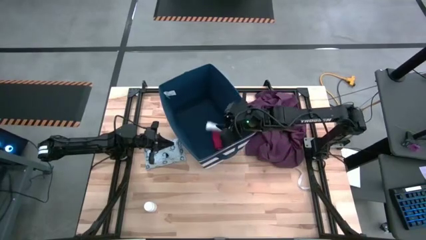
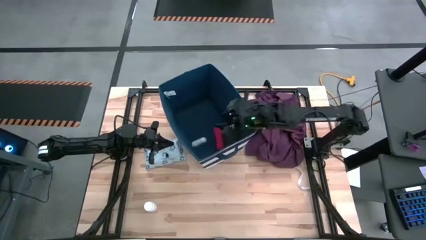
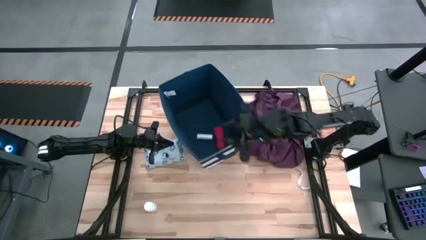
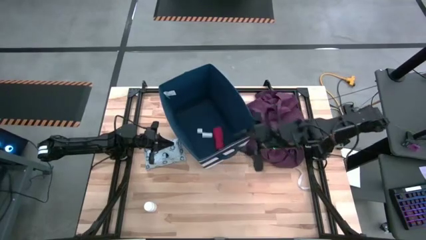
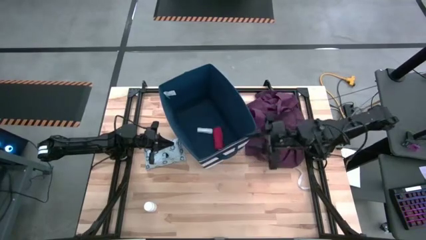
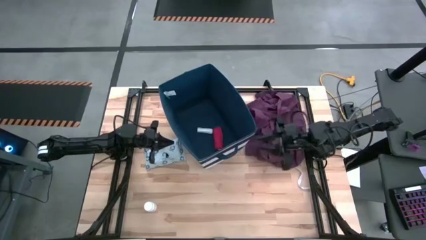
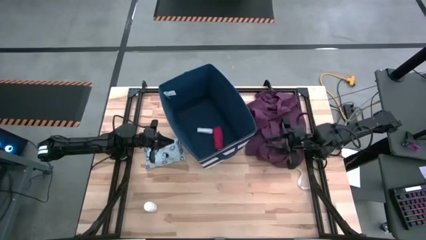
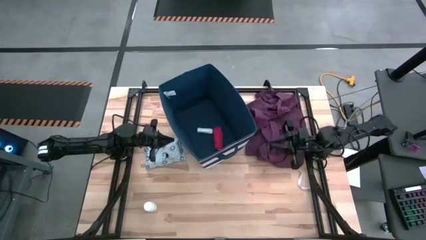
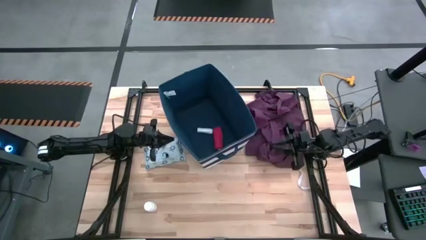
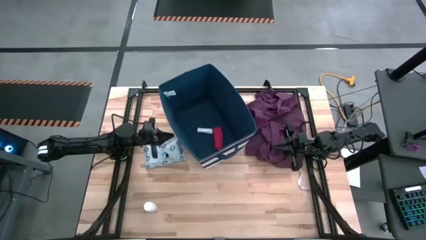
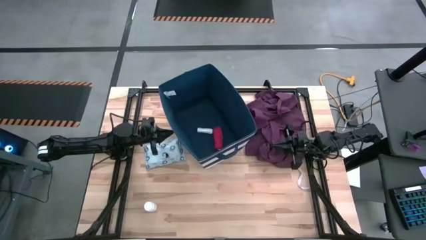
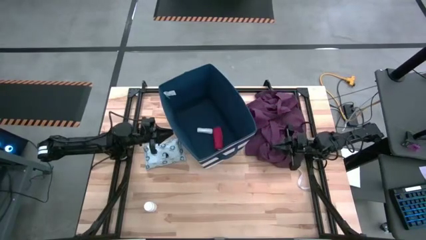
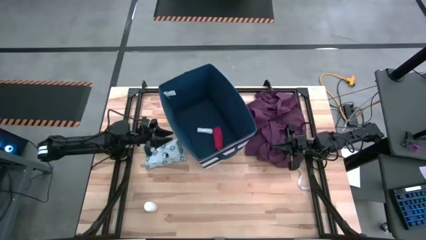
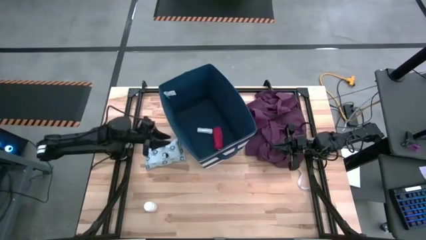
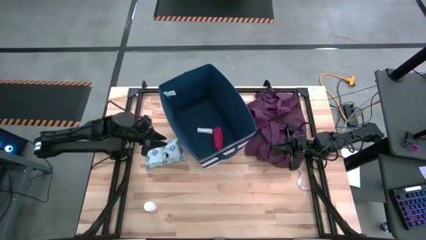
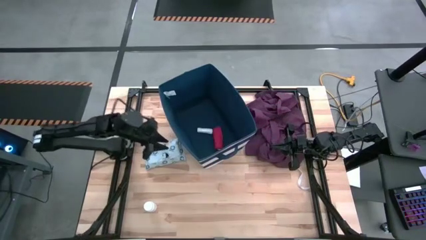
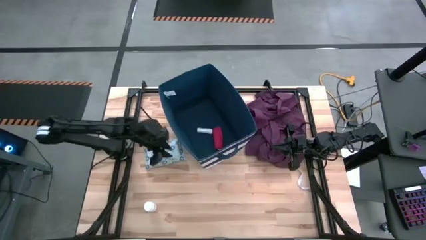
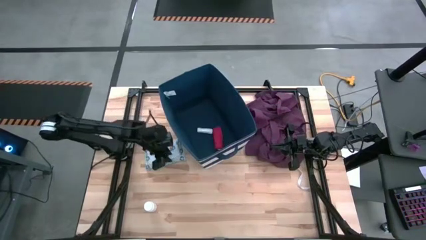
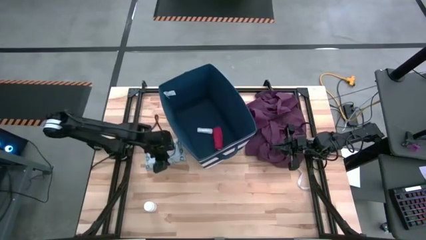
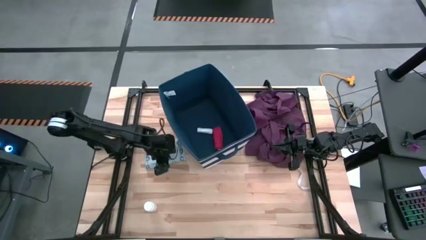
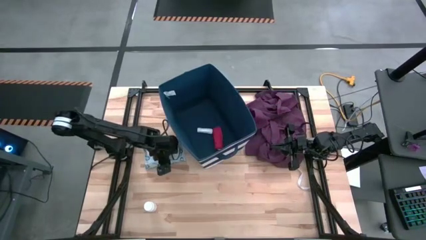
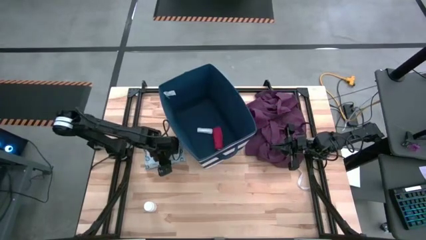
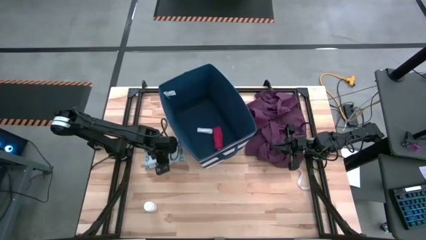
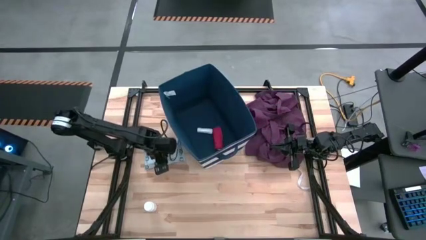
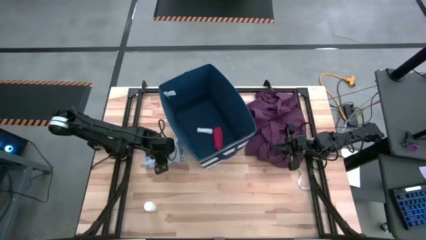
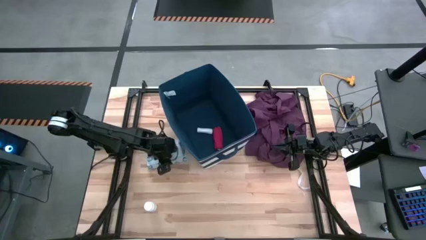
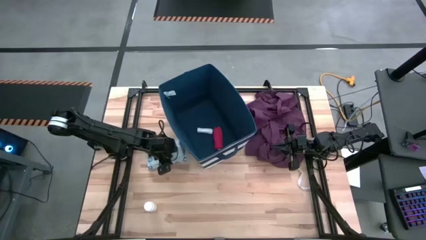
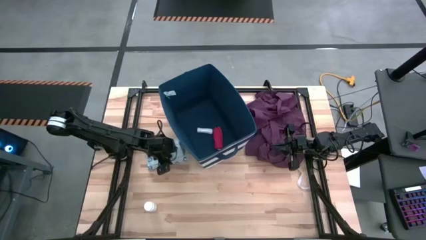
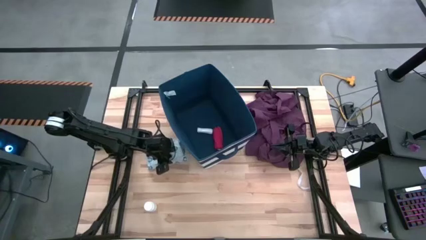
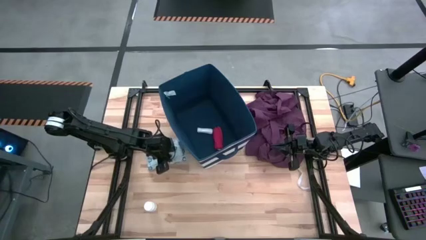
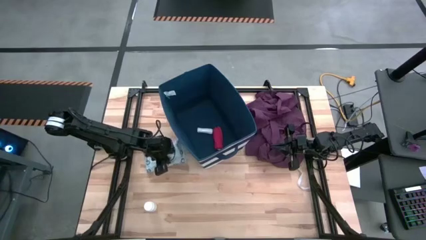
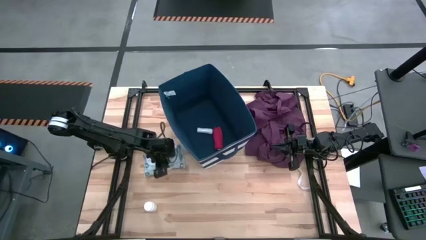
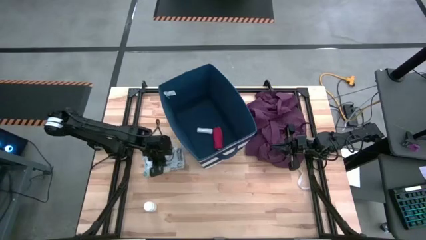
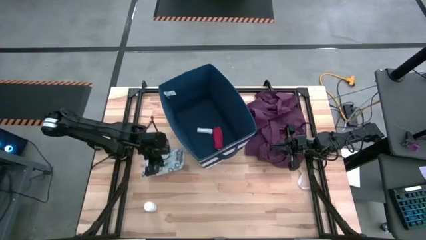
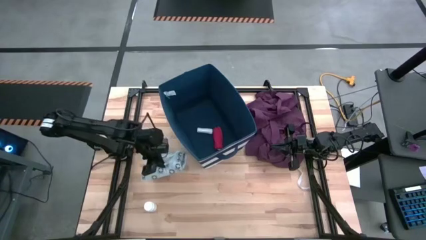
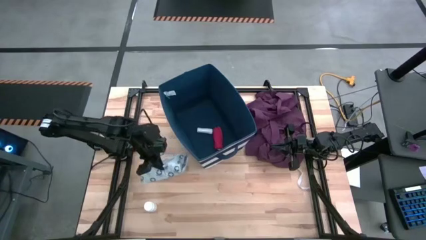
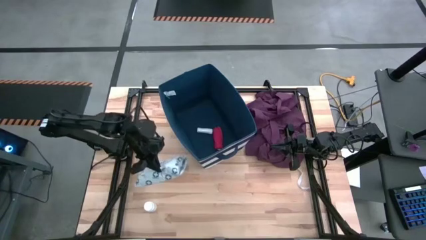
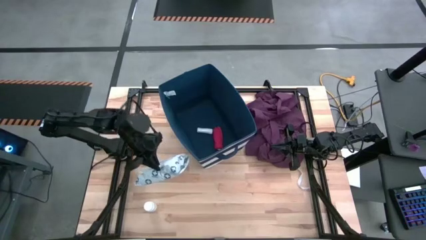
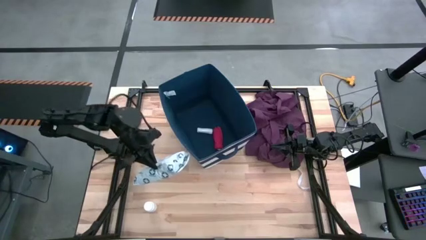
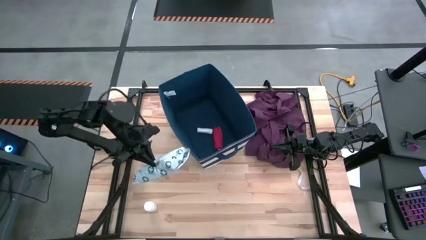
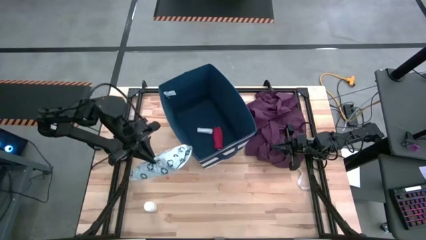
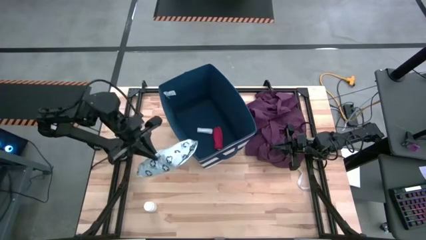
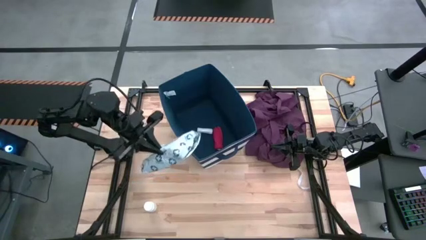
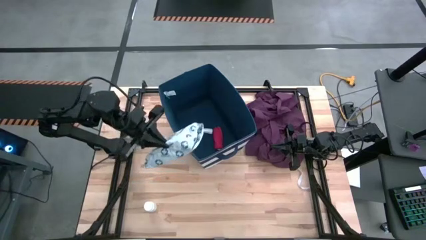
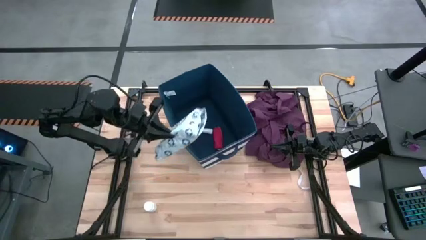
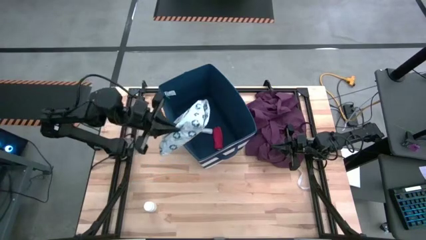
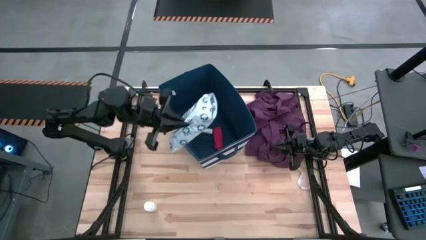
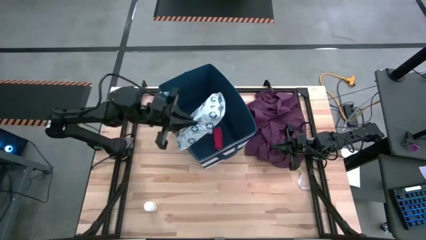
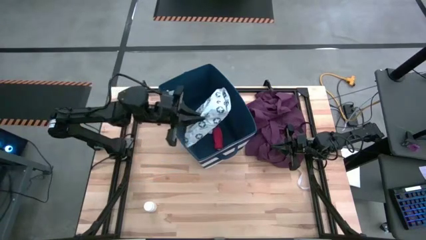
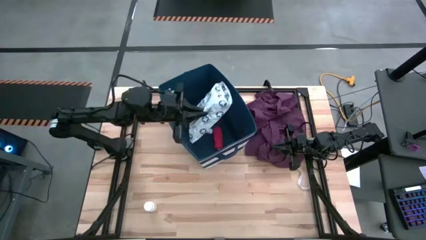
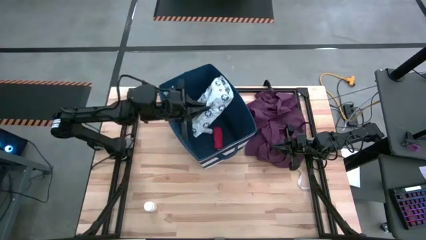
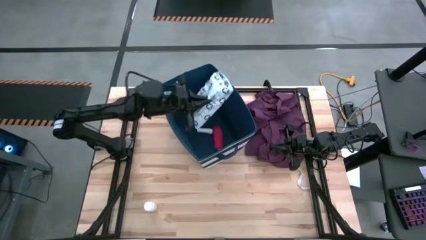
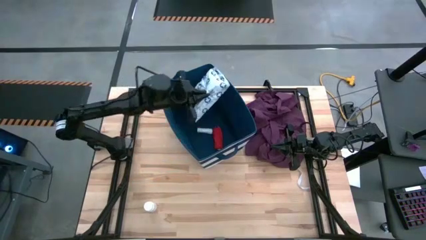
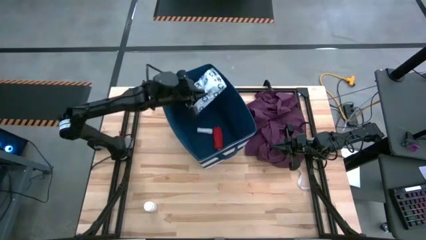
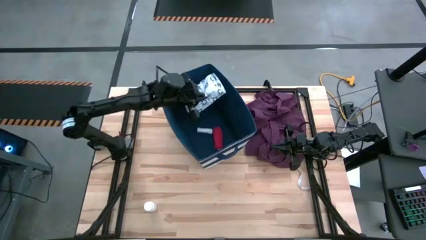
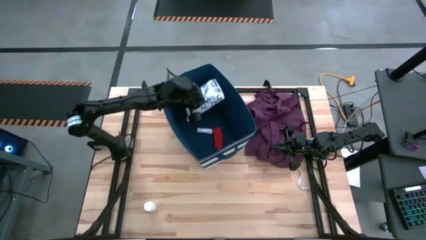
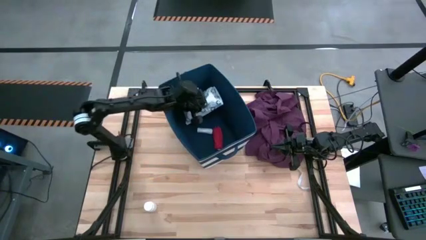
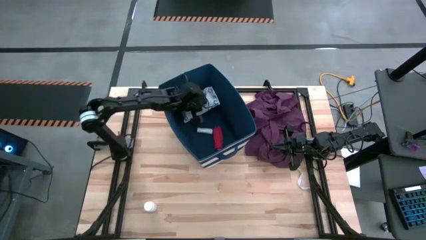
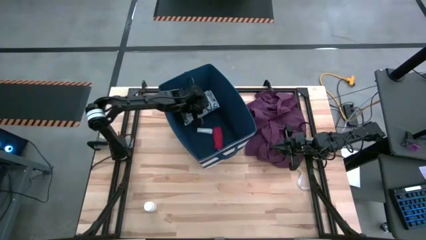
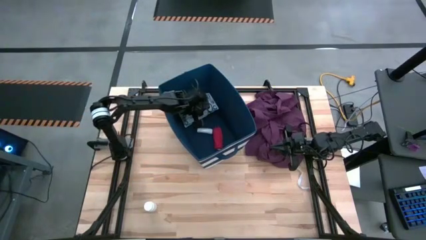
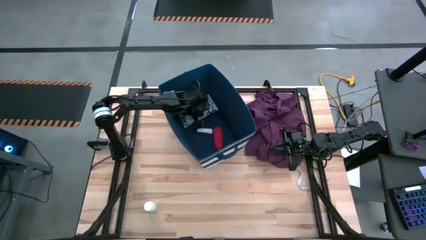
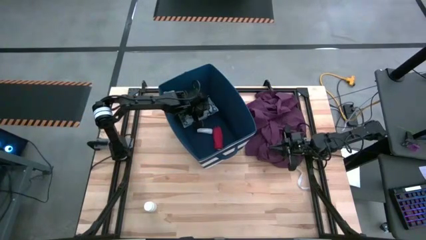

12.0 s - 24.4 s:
Task: Pick & place medical supplies in basket/bin
Put the white napkin into the laundry bin

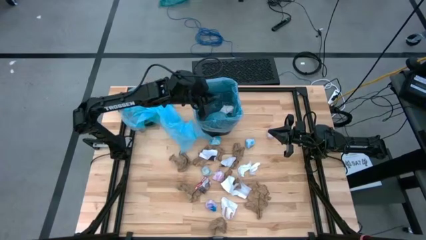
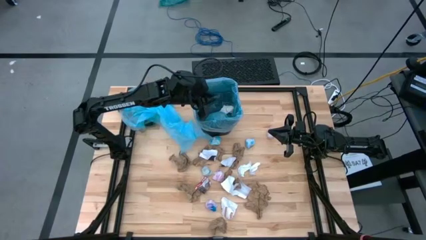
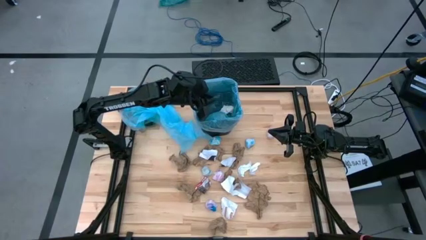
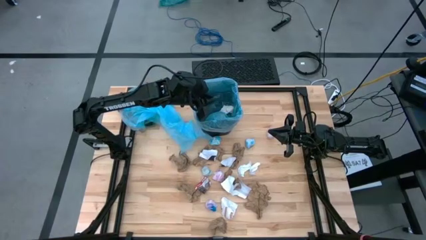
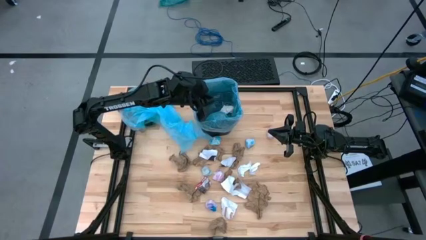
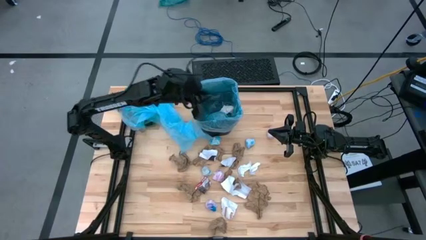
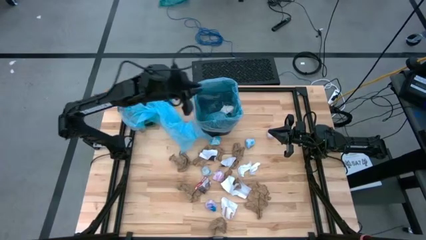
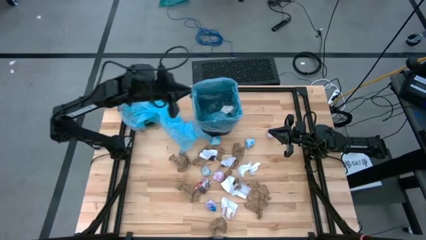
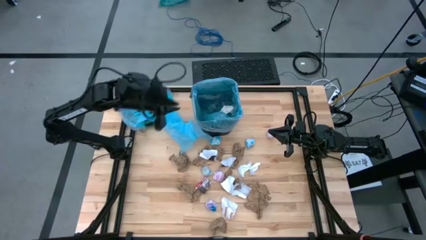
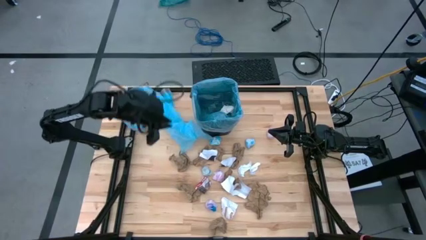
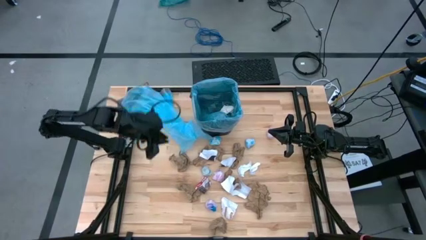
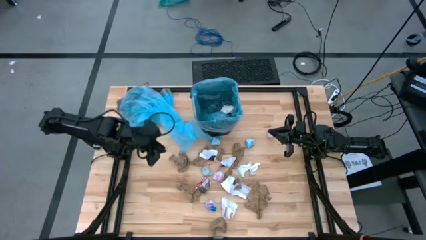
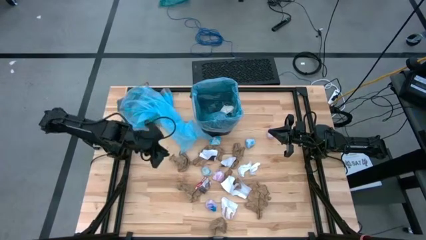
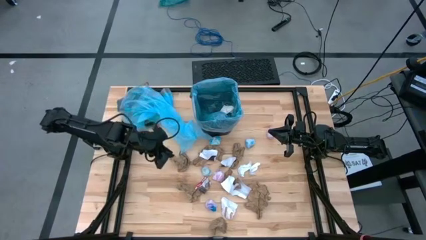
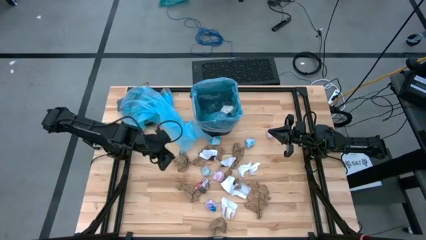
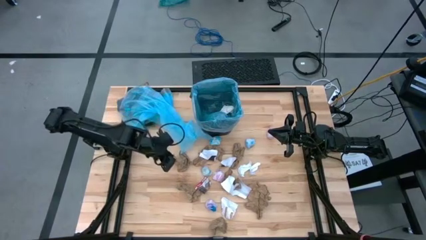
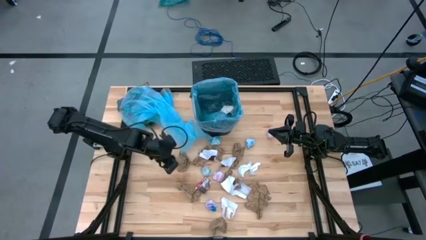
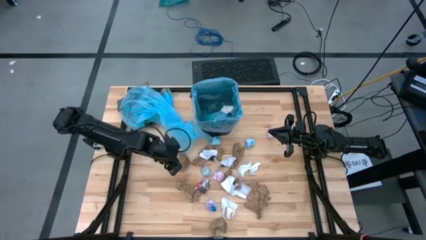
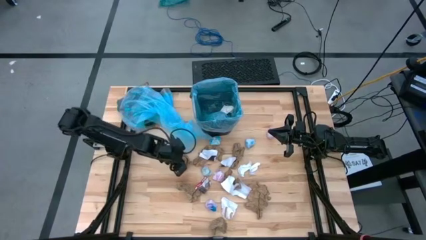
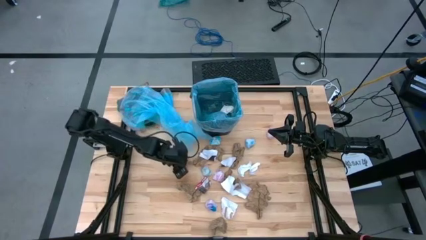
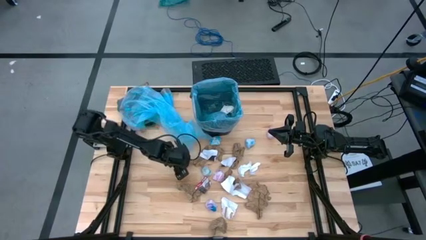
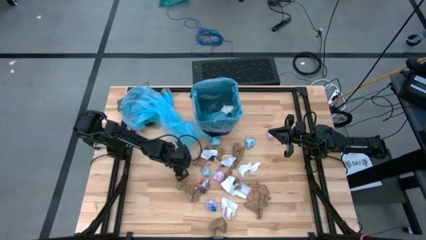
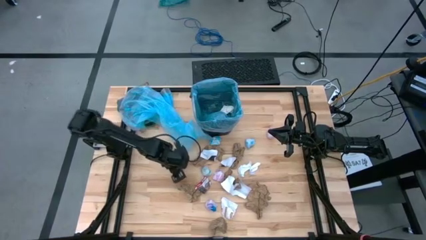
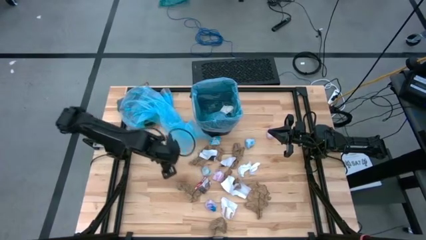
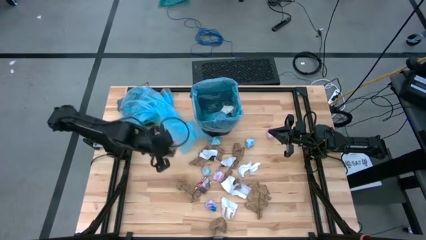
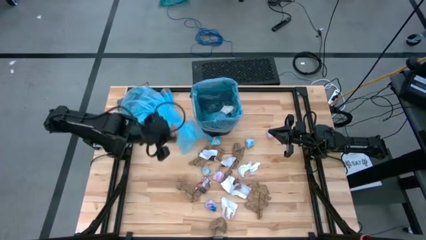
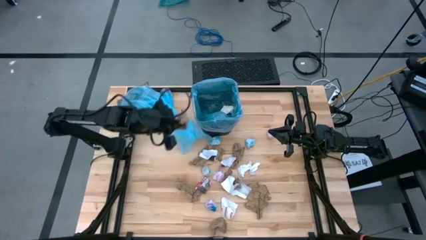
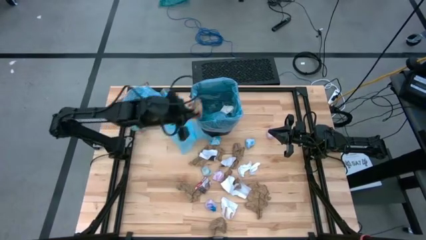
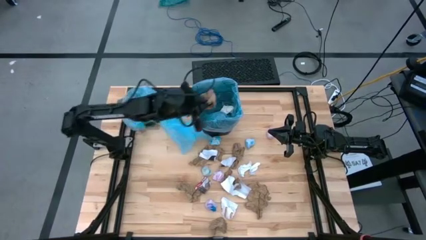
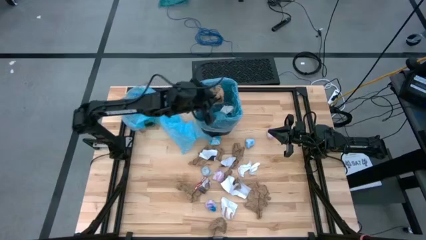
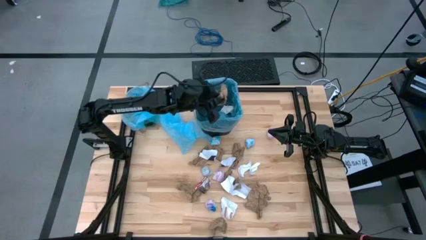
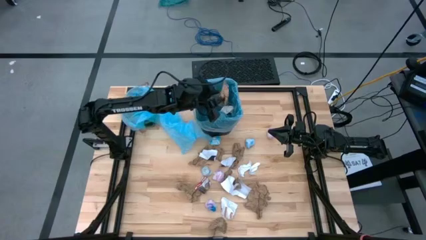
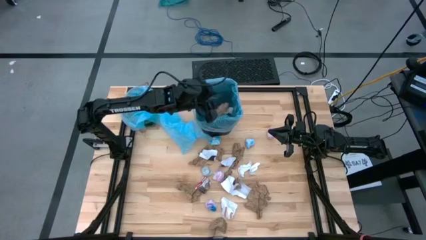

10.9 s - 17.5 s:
Task: place trash/remove bag and relplace
Put the brown paper into the trash bin
